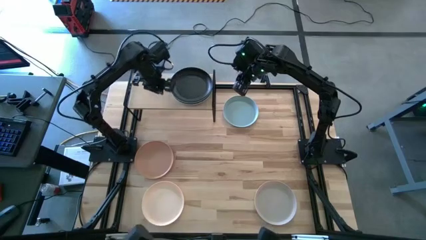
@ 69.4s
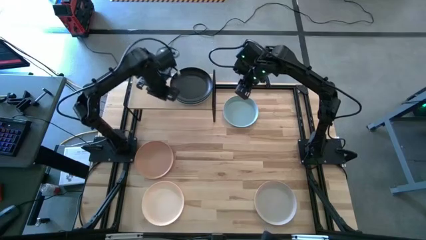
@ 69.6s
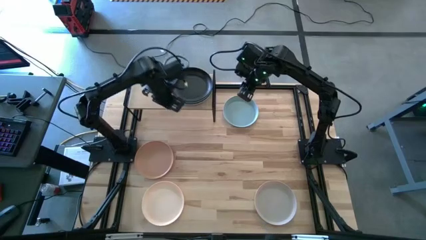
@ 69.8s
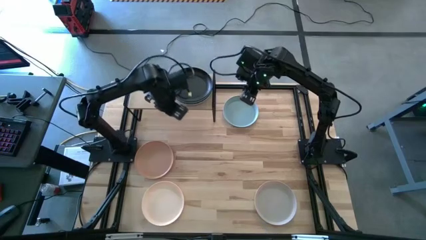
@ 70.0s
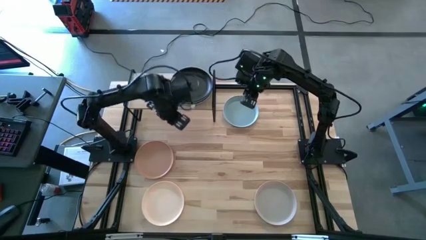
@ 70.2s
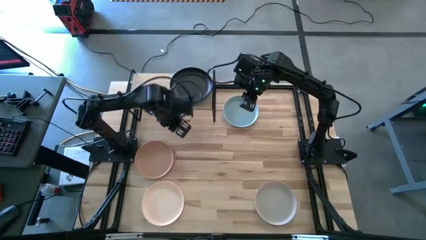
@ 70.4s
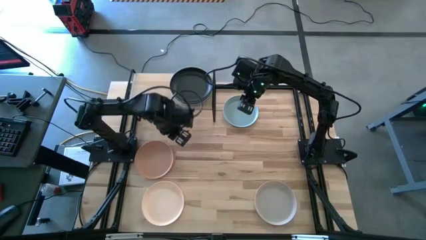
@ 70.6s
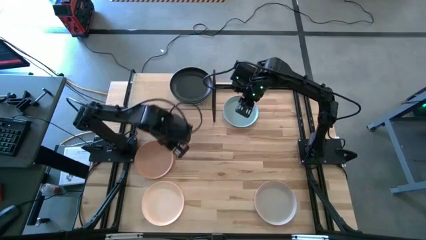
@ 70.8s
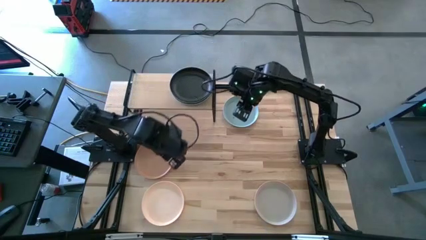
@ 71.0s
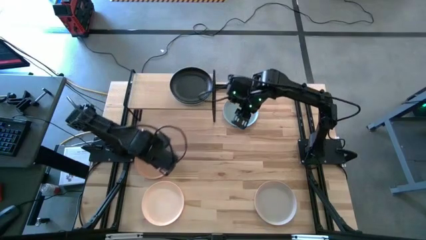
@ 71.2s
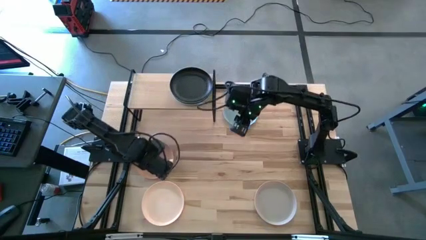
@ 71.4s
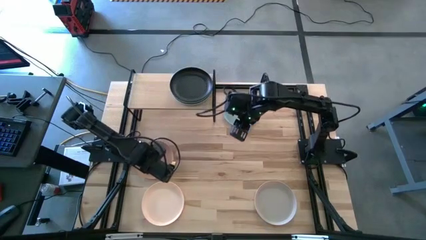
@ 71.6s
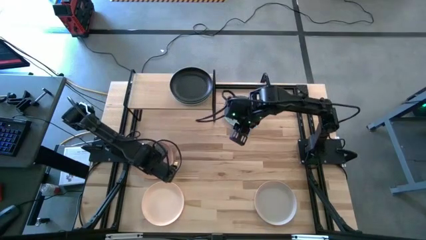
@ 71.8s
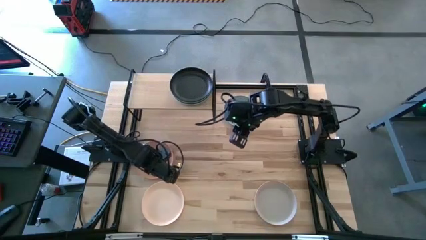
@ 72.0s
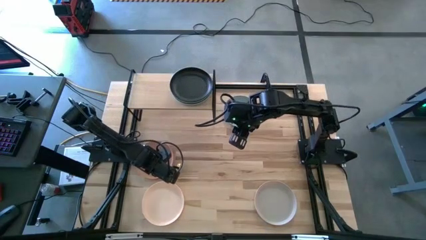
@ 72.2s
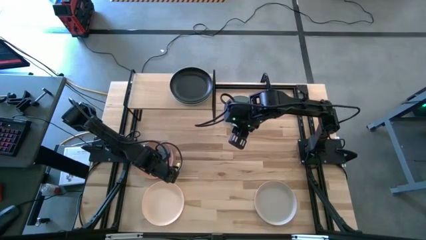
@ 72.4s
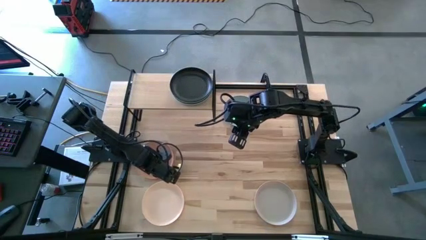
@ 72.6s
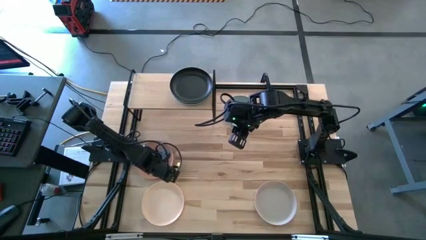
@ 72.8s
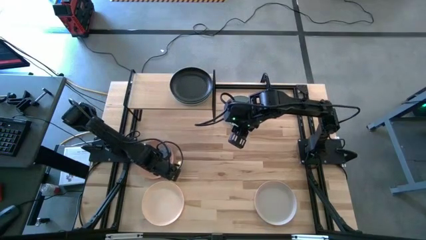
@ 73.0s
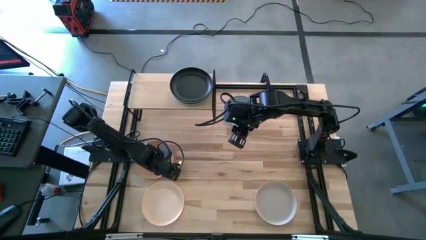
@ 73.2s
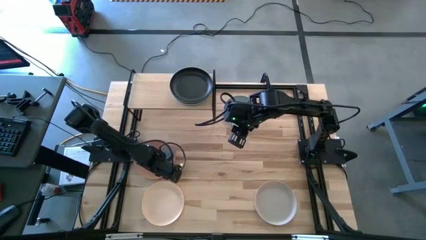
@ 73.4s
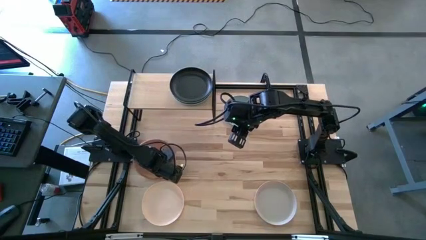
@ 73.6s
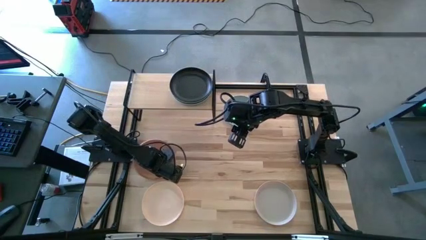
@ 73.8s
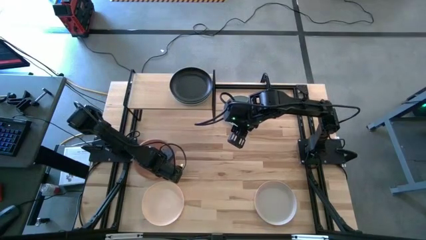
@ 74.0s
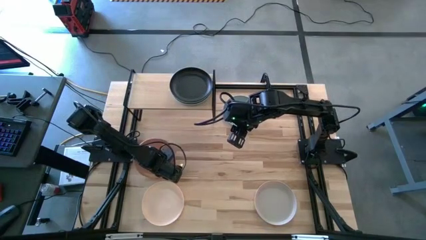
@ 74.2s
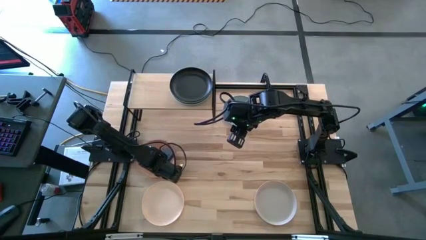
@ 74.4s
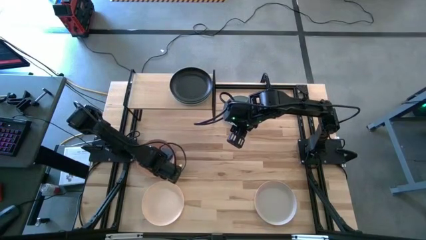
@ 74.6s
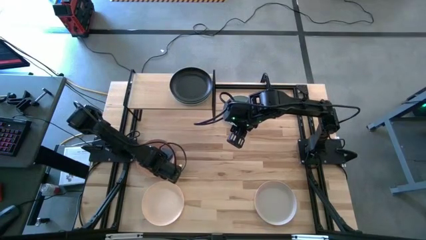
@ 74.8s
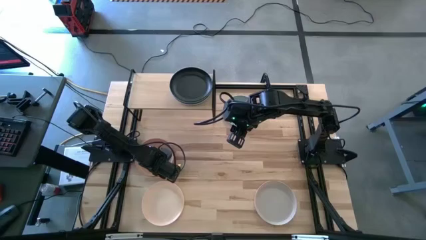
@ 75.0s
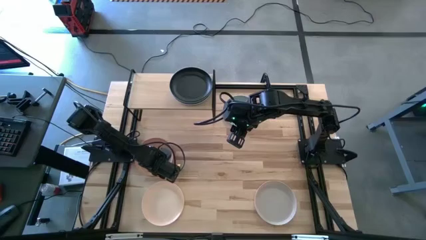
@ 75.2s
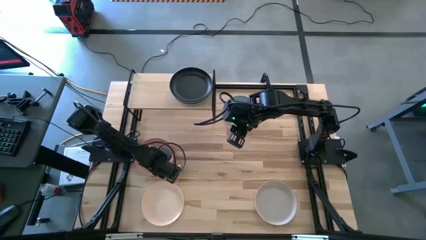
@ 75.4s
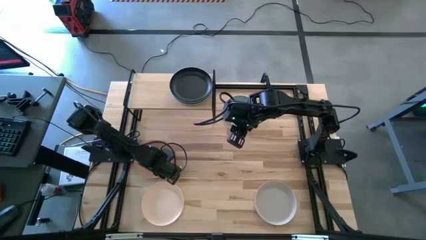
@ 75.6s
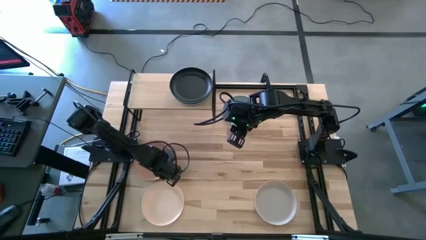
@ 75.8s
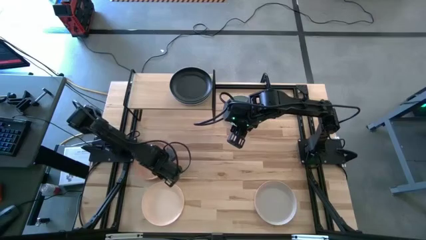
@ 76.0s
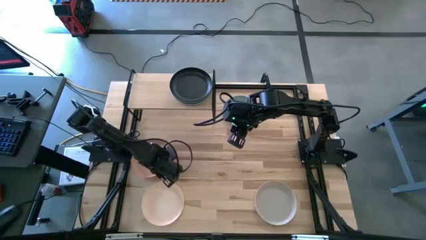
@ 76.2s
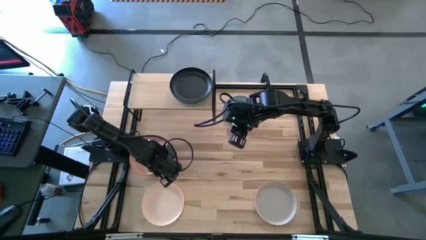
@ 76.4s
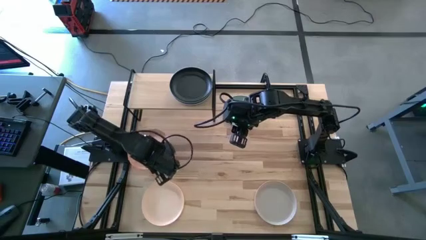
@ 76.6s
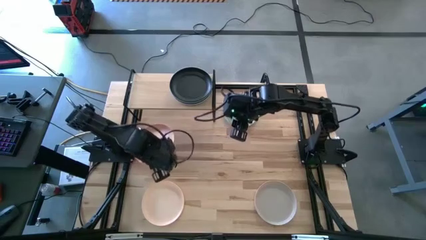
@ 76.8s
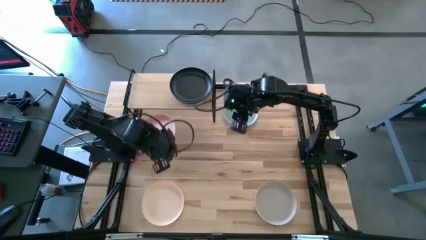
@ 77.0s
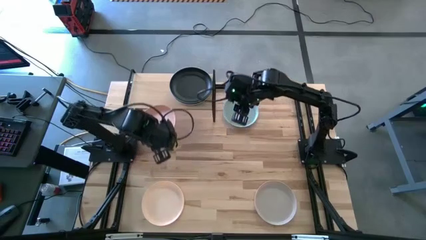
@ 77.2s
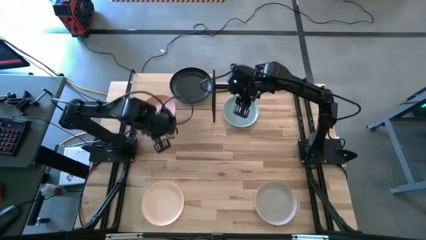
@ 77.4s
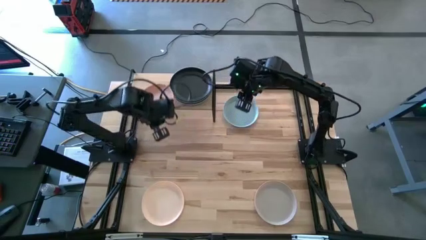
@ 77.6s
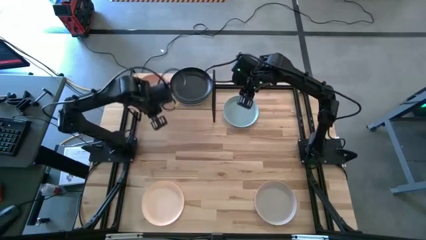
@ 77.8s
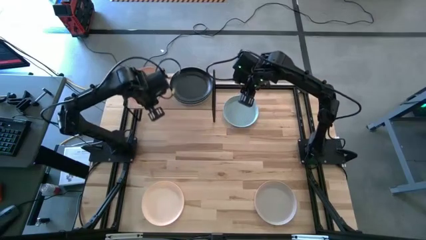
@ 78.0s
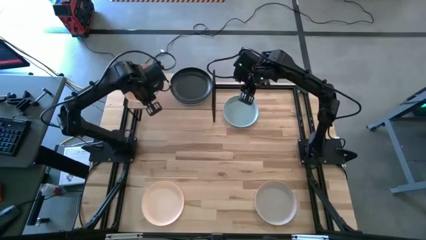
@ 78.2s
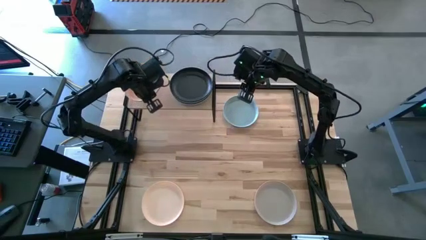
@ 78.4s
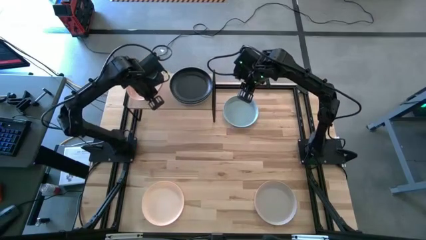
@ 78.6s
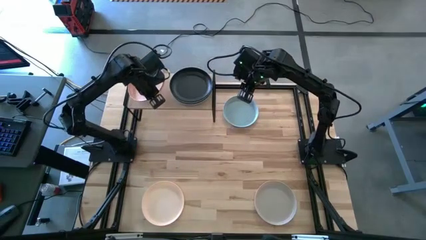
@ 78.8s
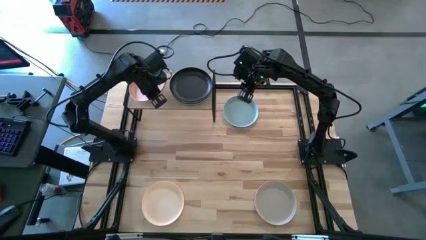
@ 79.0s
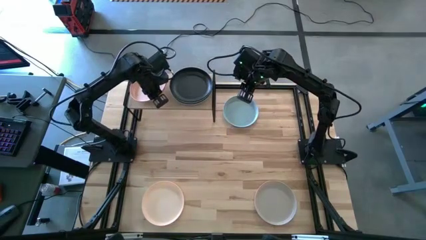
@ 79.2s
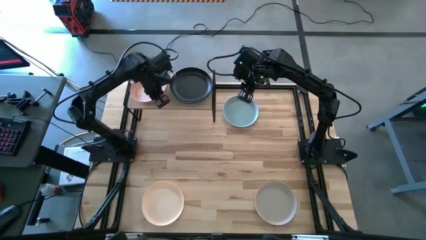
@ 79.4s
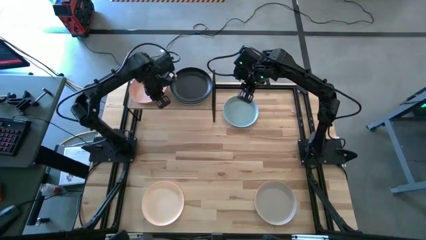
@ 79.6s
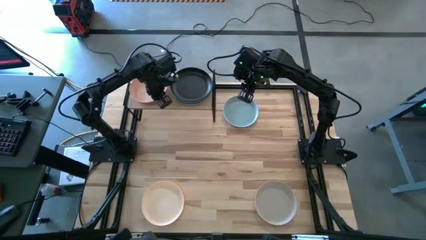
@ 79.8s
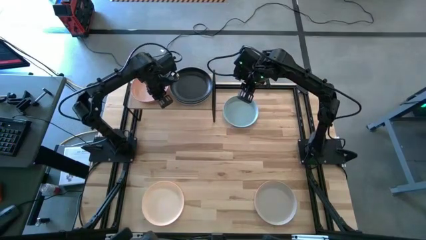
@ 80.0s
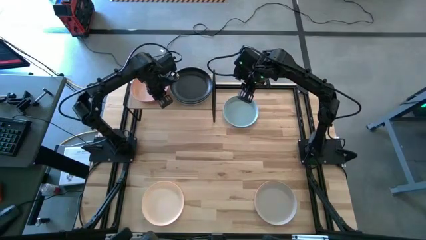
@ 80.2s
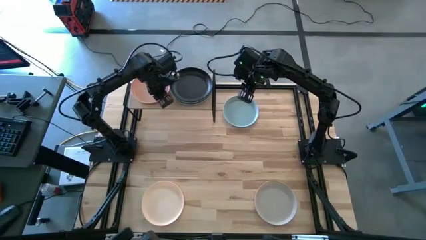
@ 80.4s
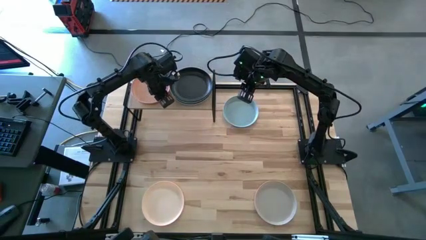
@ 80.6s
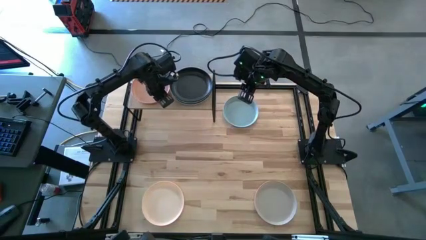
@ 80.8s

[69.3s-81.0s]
Task: Place and stack plates onto a shelf
Put the brown plate on the shelf

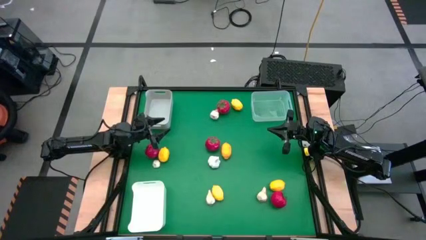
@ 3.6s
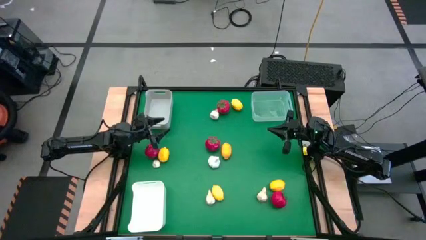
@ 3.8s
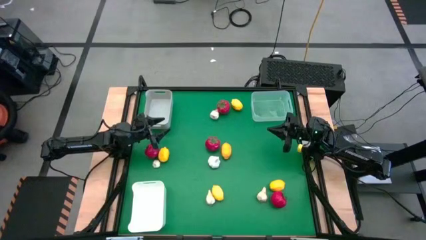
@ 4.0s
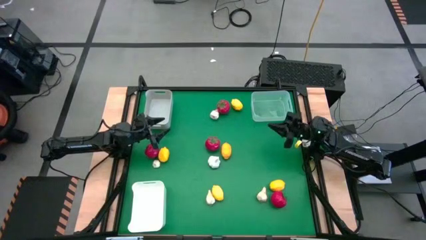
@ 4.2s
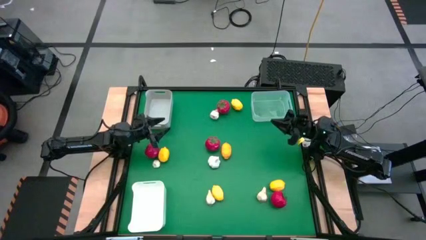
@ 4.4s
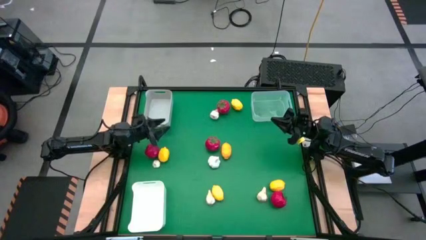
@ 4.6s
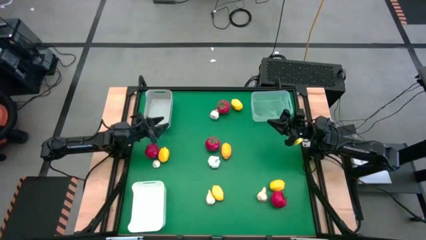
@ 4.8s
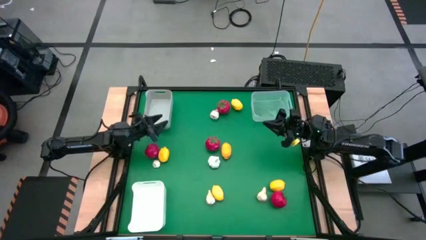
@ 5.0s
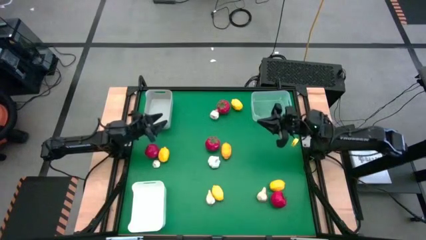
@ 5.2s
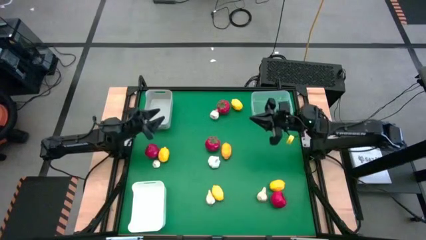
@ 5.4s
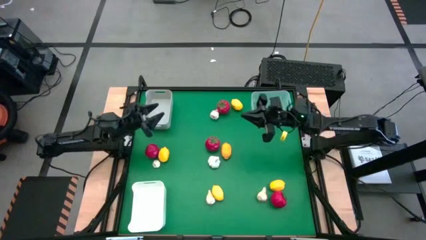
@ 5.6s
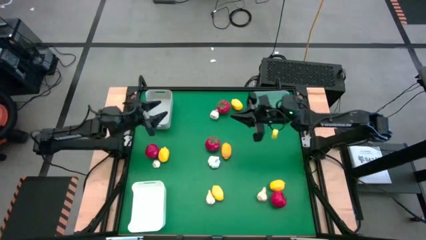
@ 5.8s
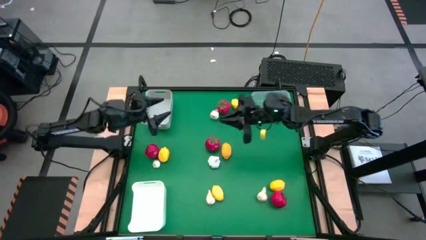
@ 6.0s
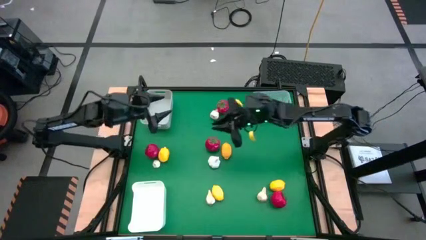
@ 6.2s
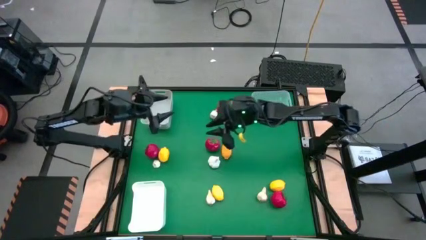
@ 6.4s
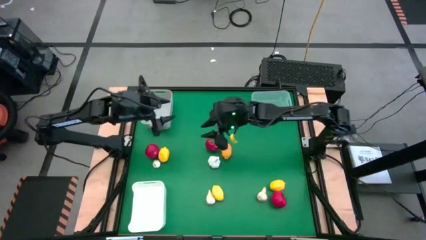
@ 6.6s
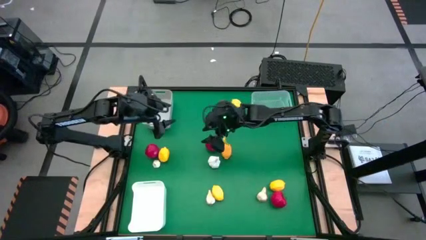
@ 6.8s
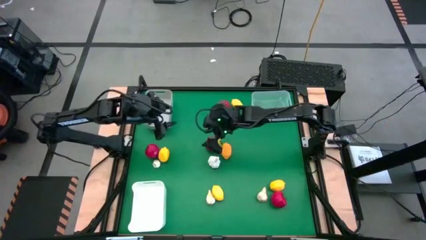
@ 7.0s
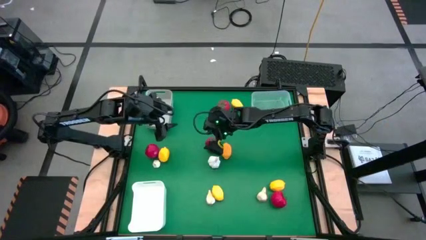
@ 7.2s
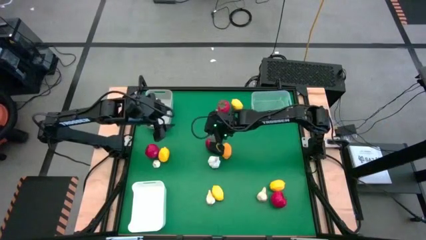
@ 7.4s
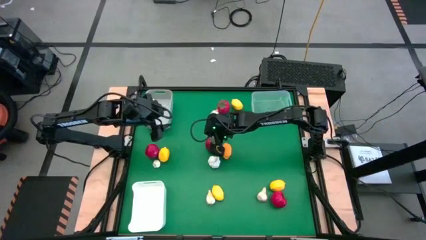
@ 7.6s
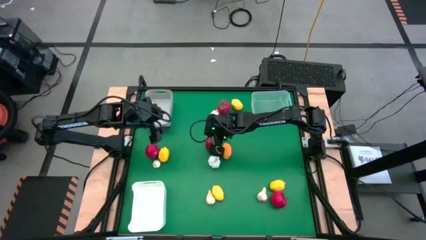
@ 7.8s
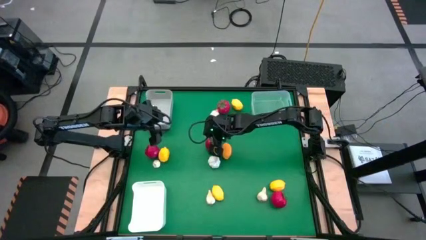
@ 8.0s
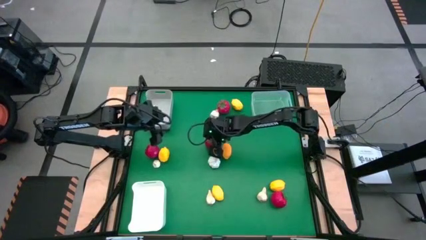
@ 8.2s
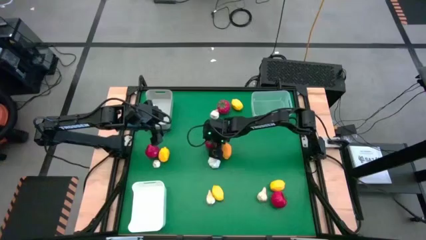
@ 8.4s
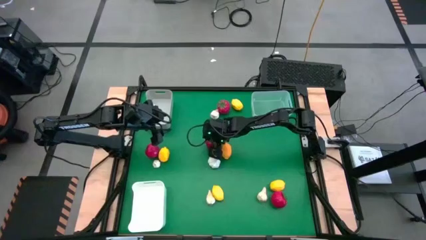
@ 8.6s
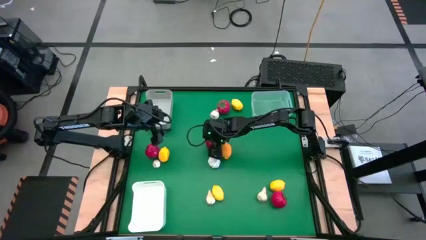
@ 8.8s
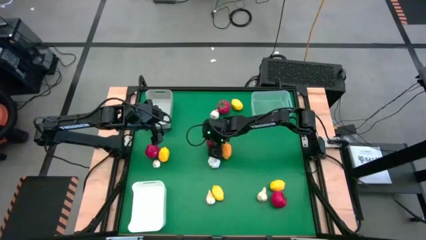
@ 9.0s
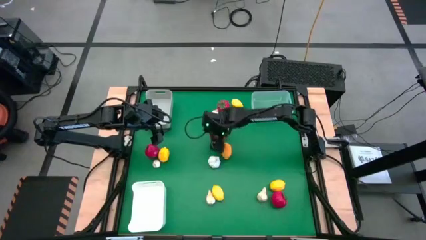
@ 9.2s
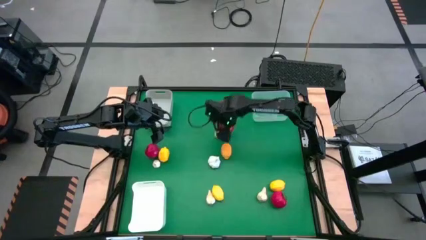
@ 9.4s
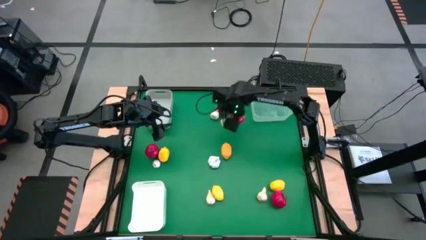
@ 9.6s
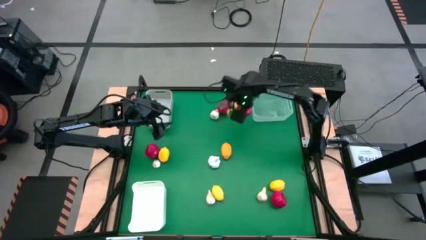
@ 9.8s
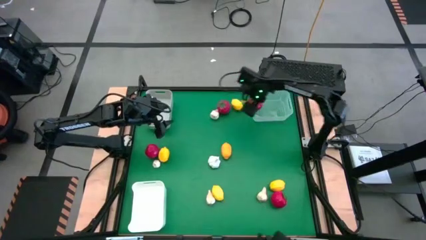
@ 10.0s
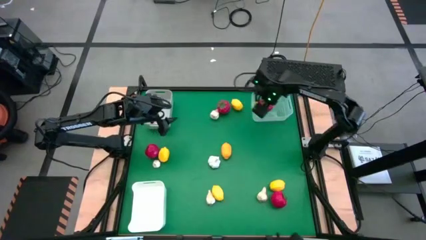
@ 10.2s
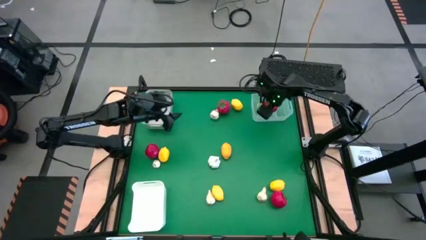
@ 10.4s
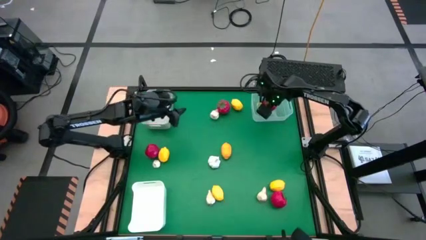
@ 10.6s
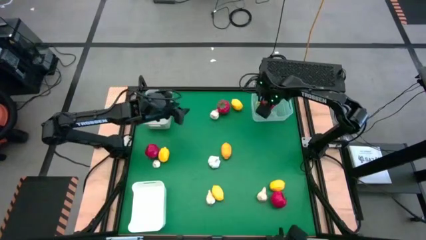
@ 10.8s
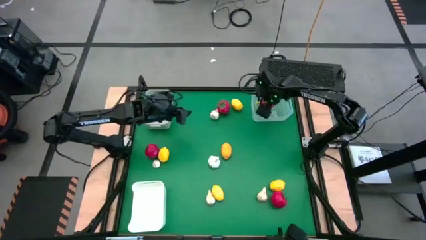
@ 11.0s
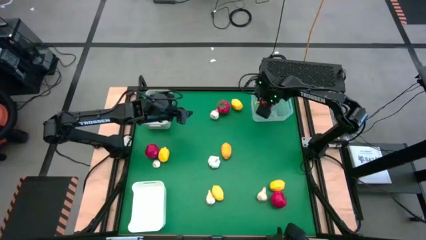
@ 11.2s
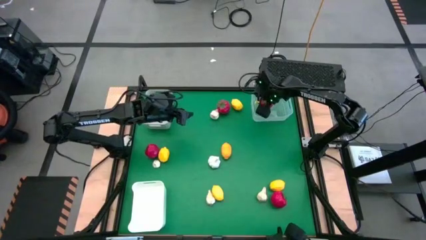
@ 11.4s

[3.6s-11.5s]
Task: Sort produce into baskets
Put the tomato into the transparent bin
